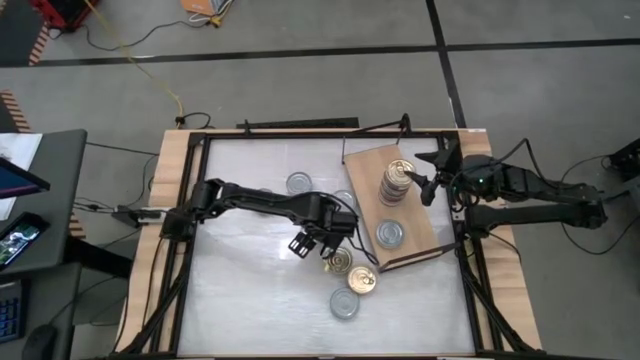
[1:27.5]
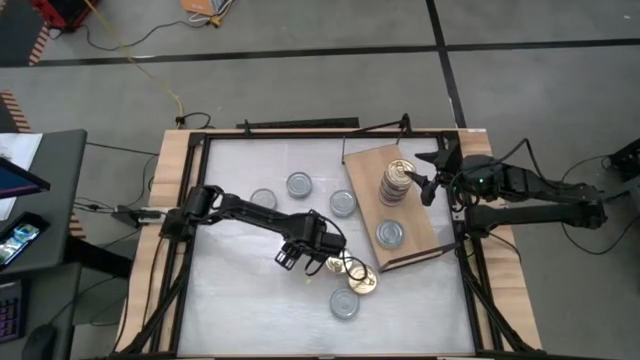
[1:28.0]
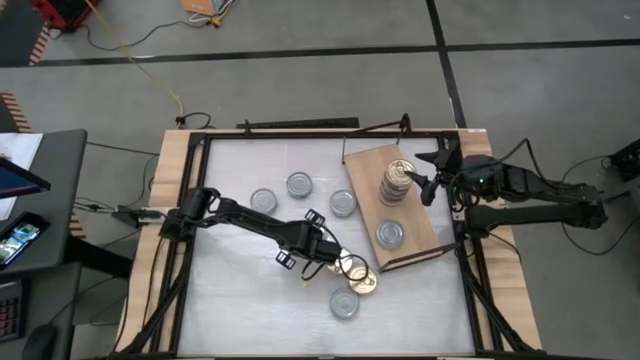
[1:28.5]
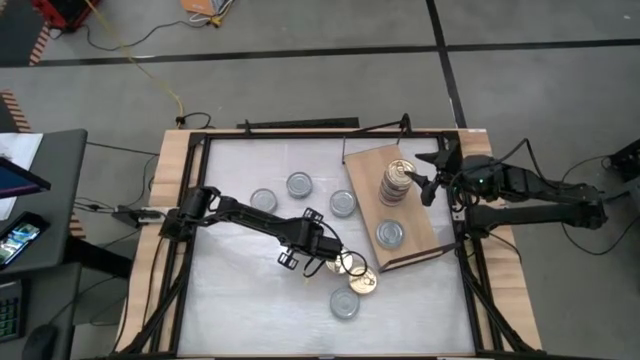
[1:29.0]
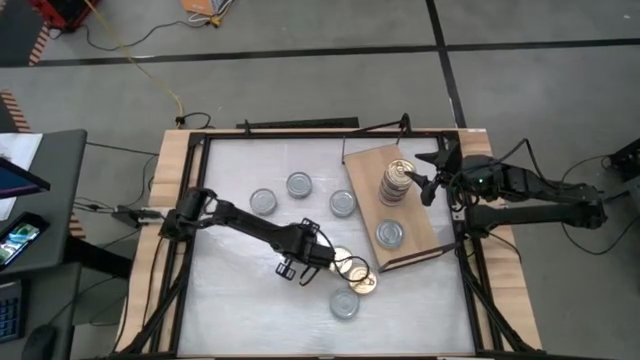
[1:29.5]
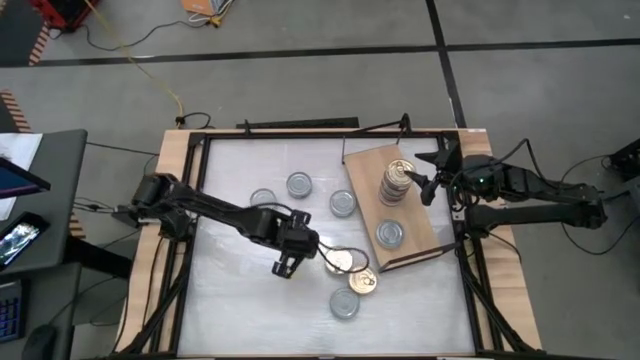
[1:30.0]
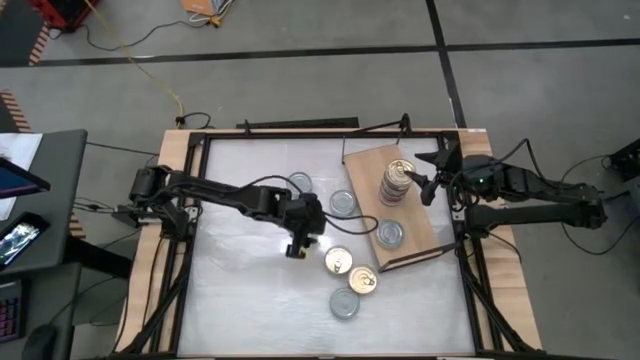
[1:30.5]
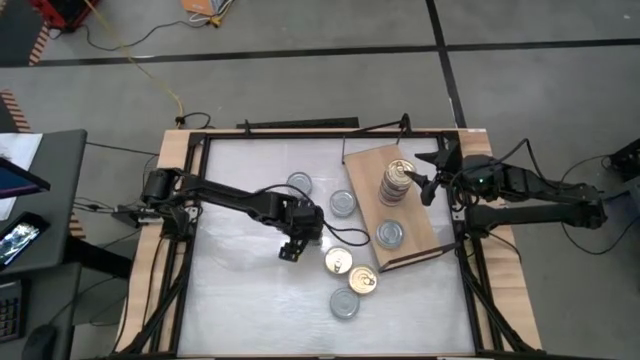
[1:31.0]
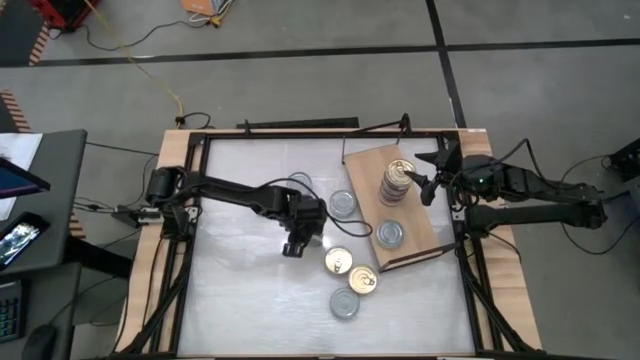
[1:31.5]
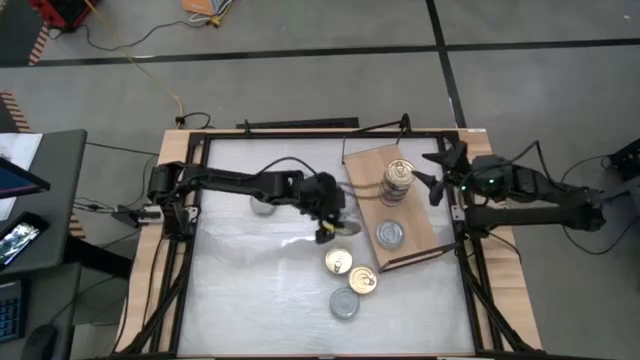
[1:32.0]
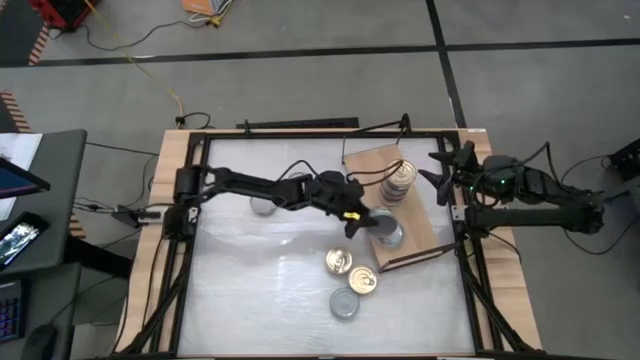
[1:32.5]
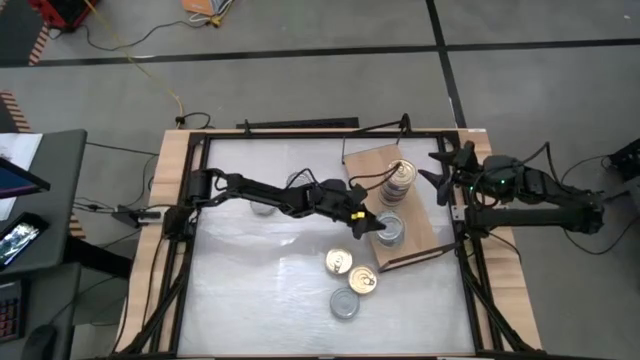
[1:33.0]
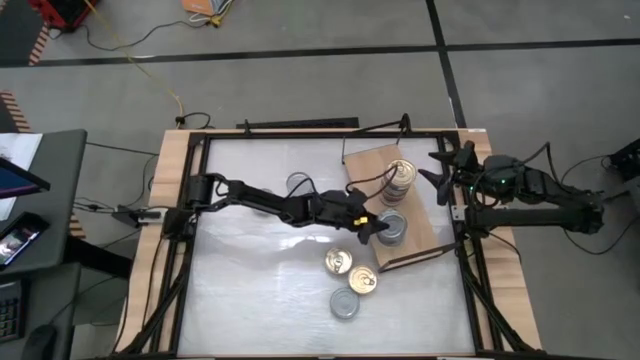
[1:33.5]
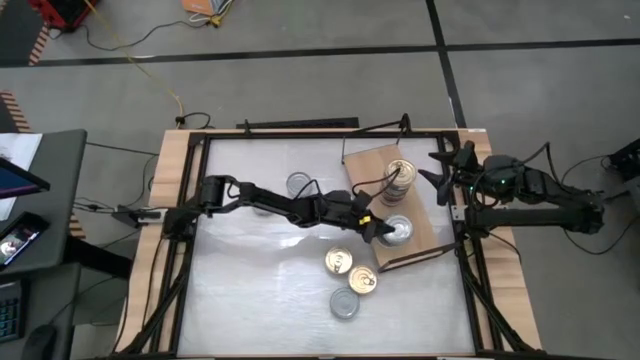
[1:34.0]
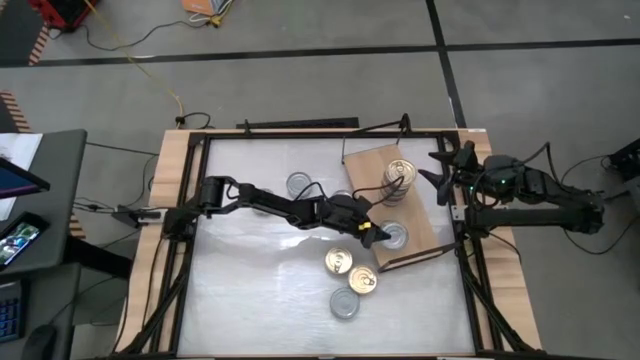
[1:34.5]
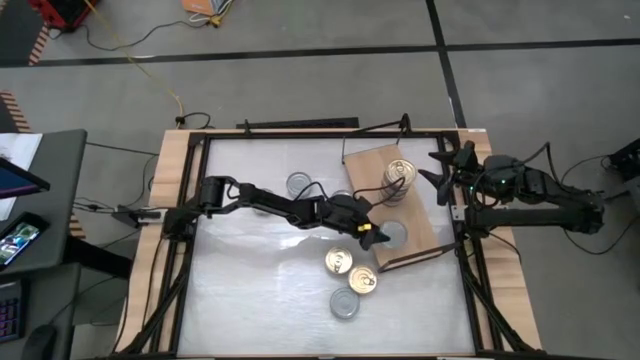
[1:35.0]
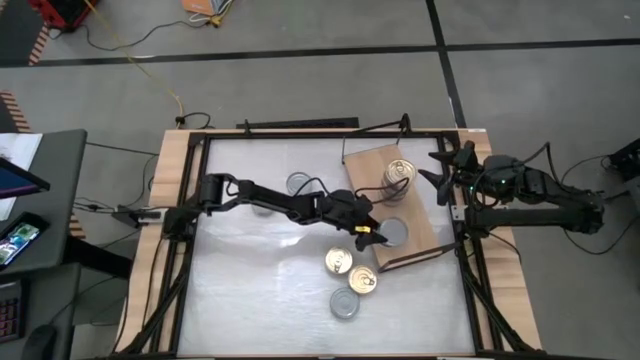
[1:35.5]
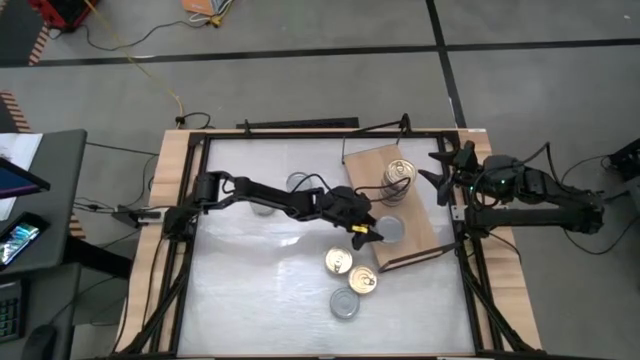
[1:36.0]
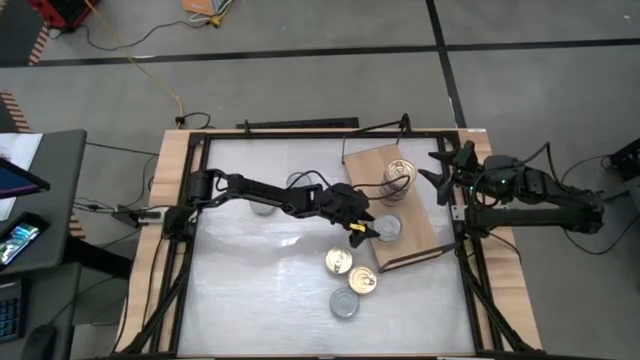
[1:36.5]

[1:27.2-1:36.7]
Task: Stack canned seafood by type on shelf
Stack the green tuna can on the green tuna can on the shelf

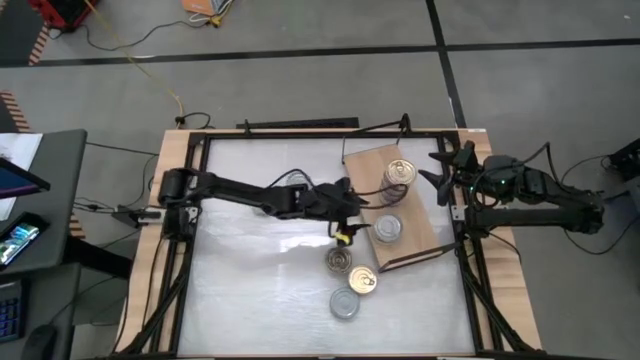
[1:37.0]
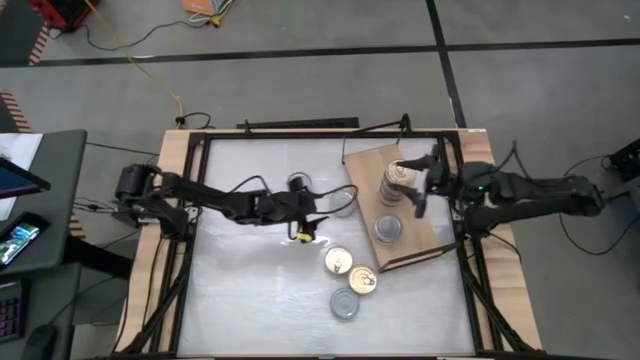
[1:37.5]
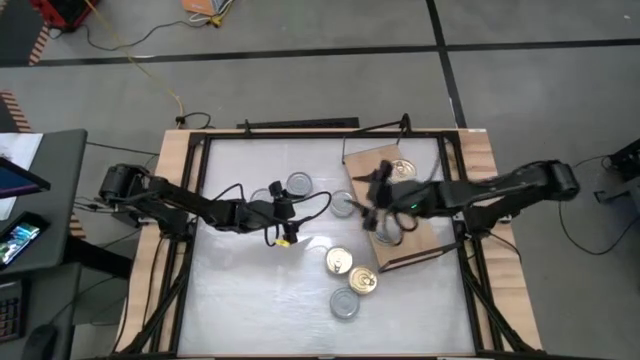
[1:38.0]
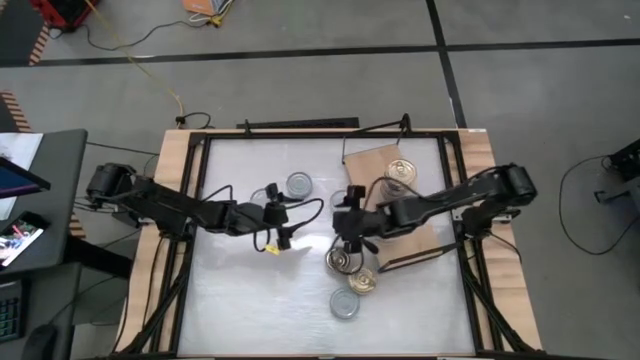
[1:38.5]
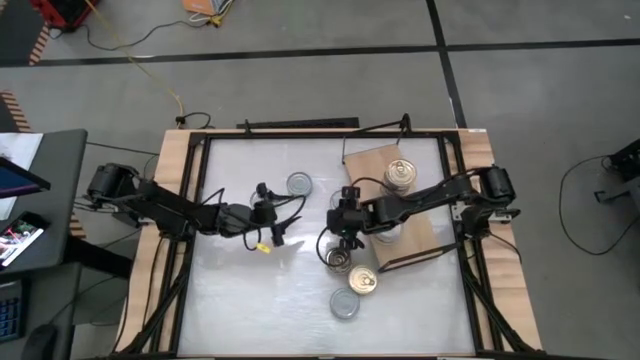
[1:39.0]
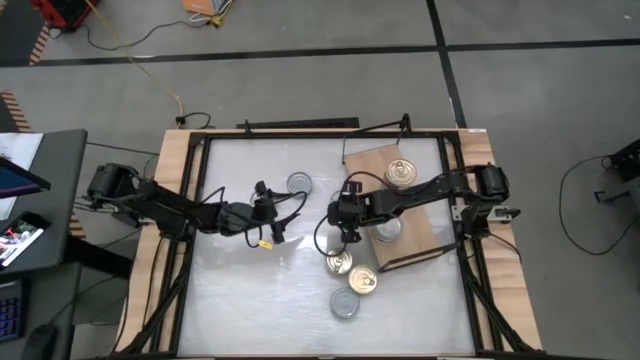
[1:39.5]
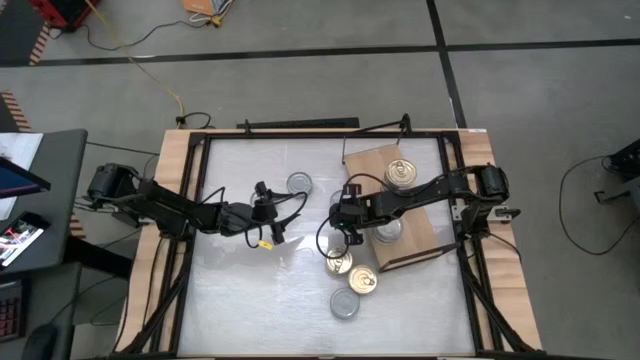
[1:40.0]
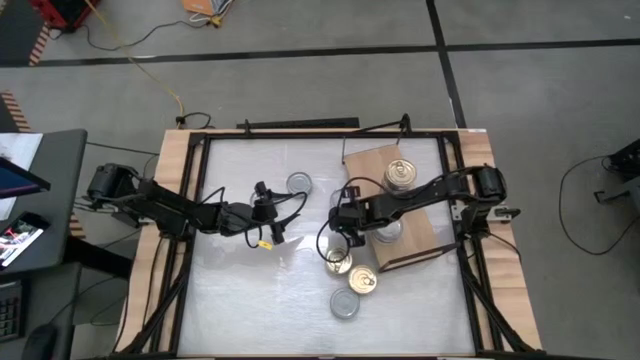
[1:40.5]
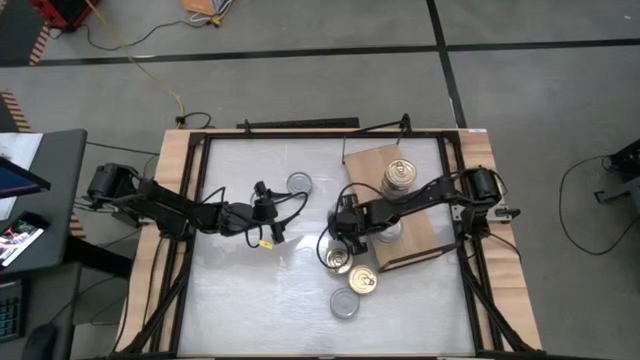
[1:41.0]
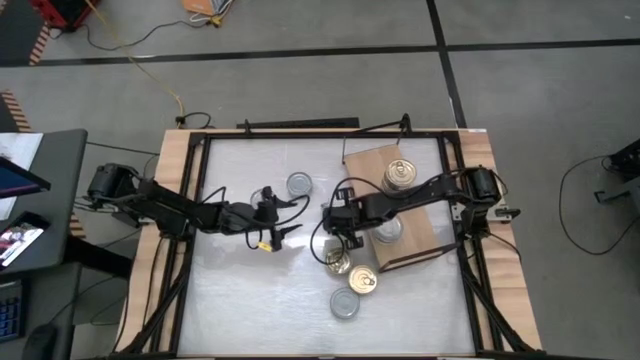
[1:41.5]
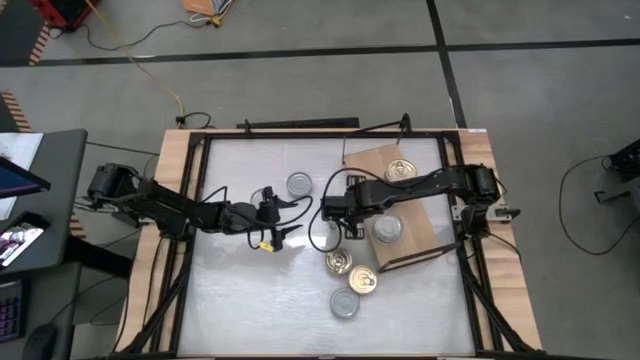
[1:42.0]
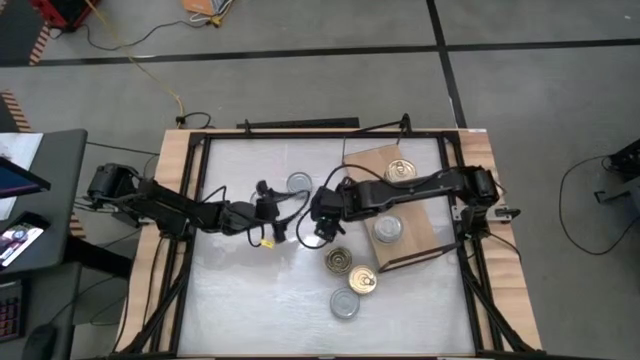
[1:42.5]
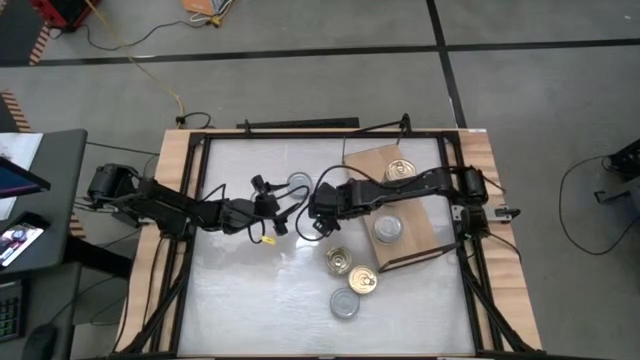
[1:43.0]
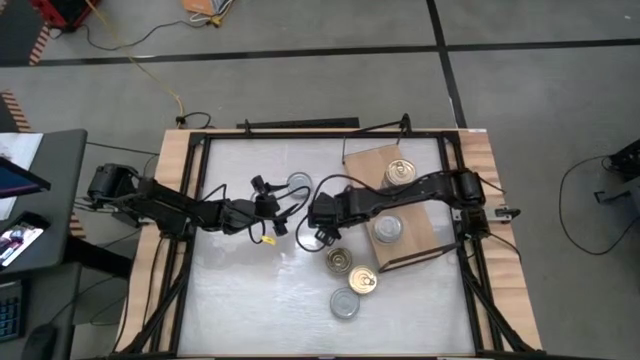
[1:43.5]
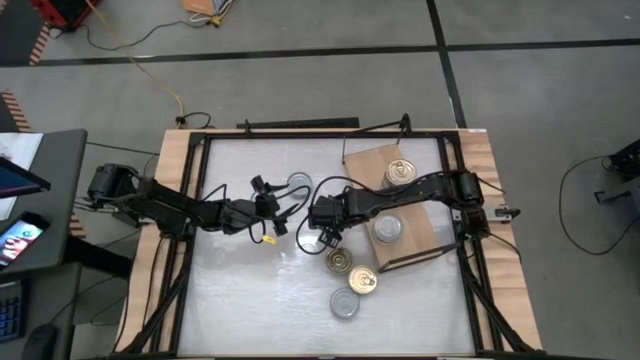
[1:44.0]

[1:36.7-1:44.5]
Stack the green tuna can on the green tuna can on the shelf

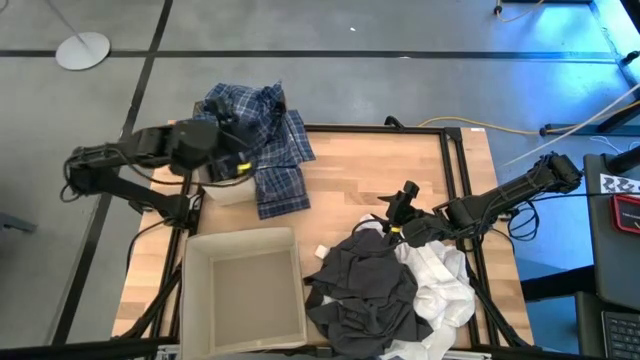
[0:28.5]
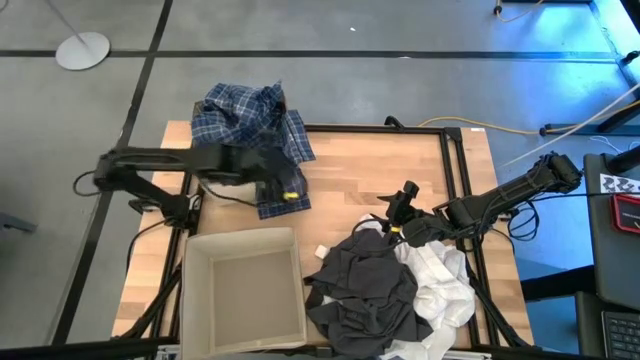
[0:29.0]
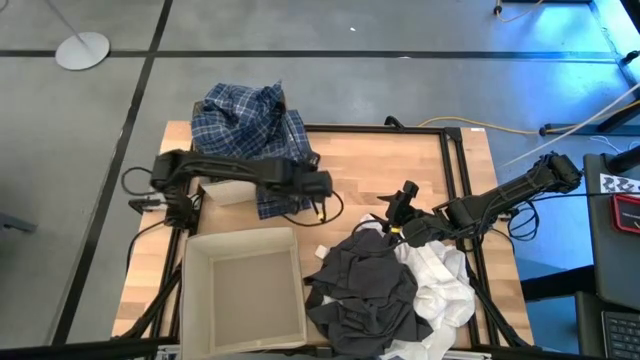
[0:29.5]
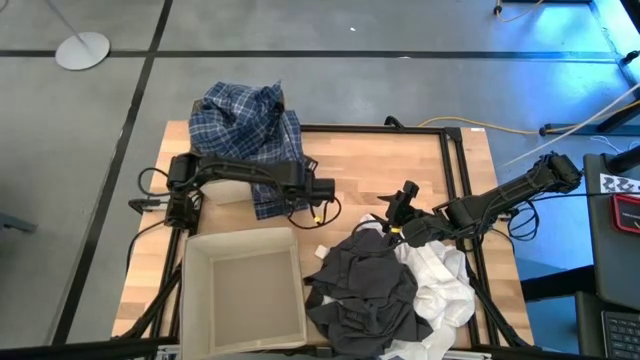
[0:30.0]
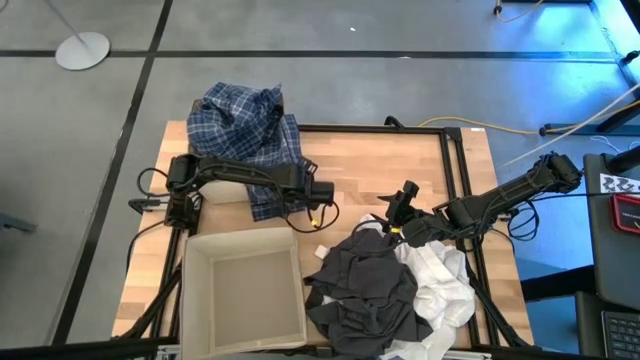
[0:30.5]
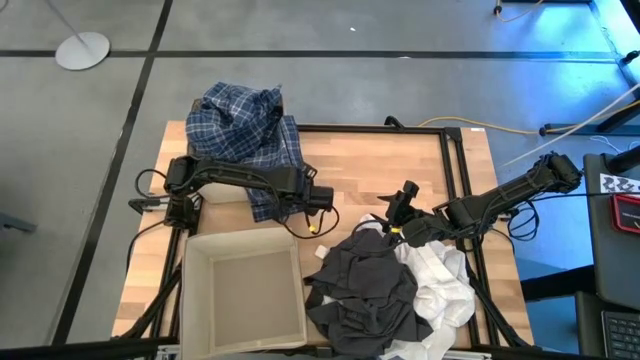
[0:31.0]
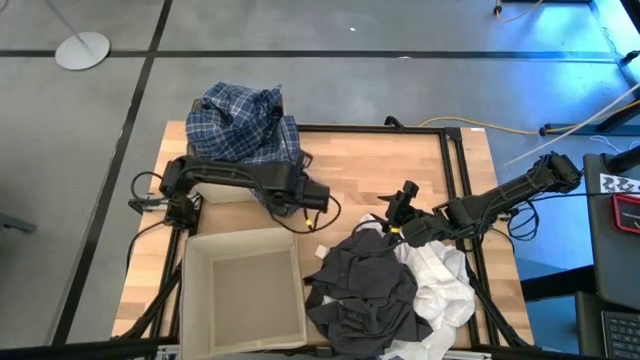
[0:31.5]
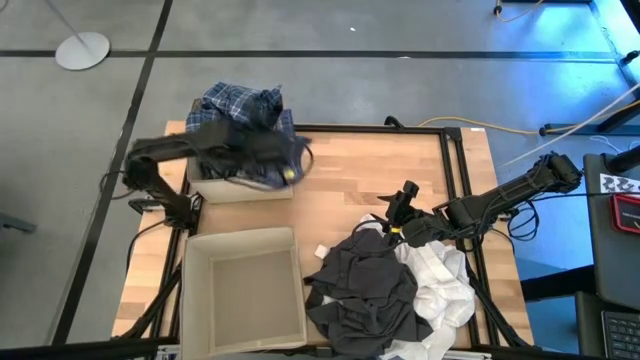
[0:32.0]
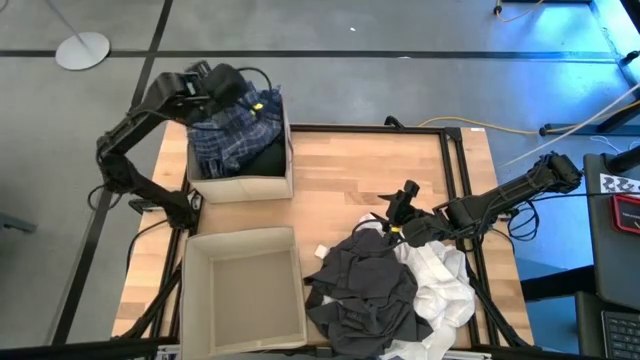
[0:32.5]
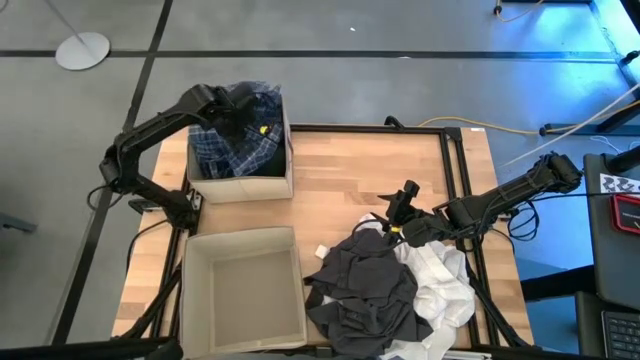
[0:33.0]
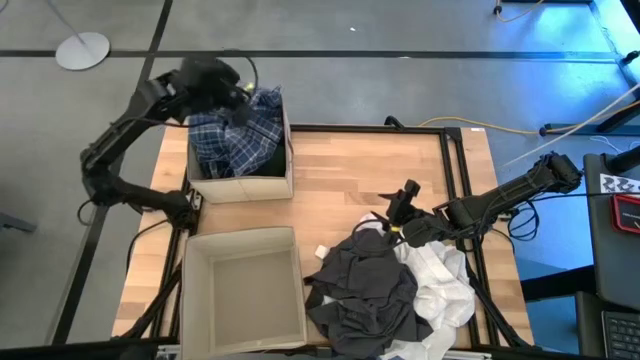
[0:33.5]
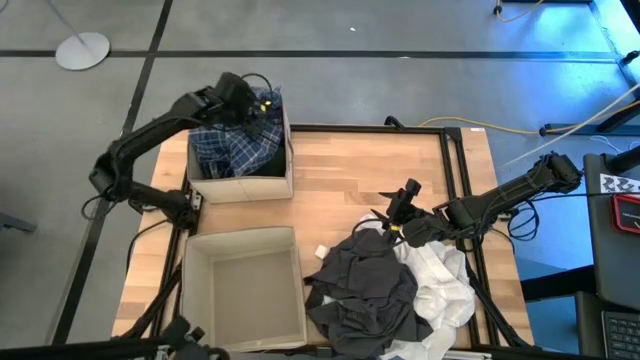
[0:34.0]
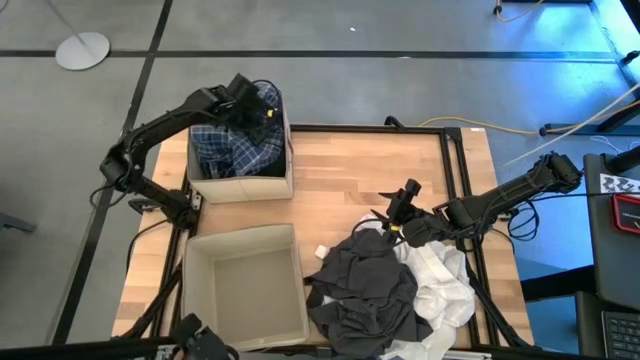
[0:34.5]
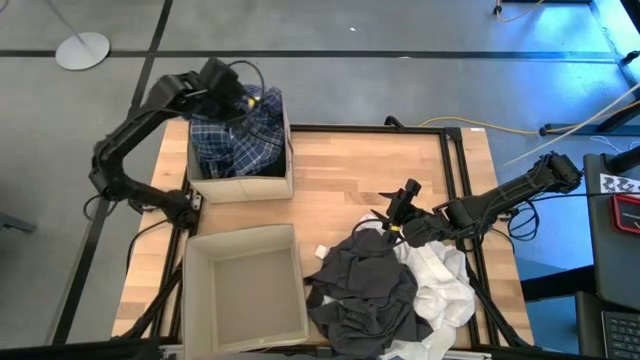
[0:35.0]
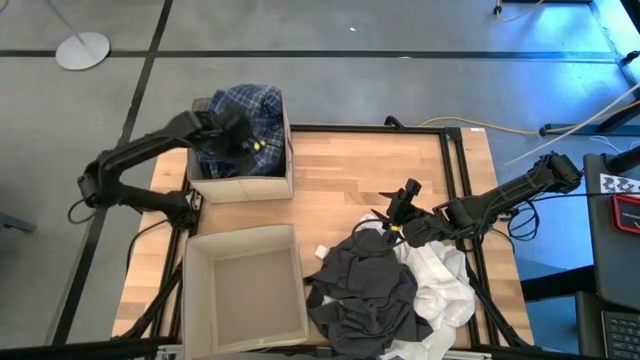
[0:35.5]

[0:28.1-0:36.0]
Task: Sort clothes
Put the blue long sleeve shirt into the top laundry organizer
